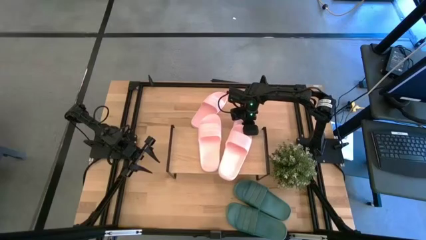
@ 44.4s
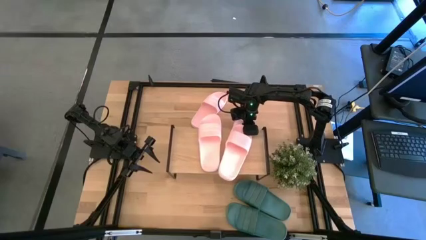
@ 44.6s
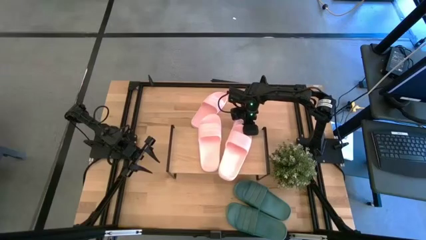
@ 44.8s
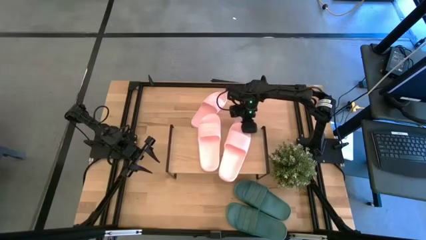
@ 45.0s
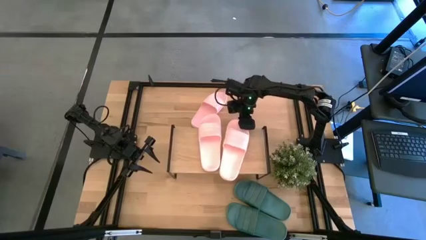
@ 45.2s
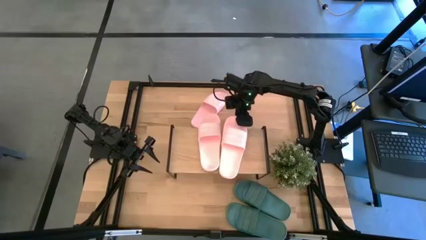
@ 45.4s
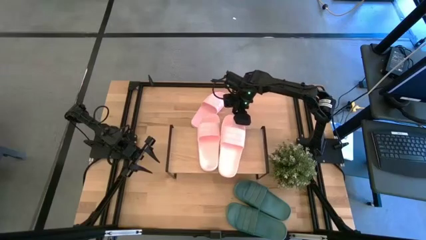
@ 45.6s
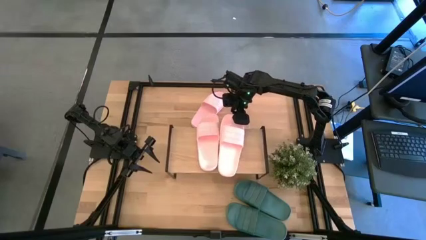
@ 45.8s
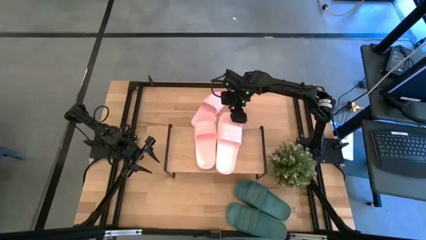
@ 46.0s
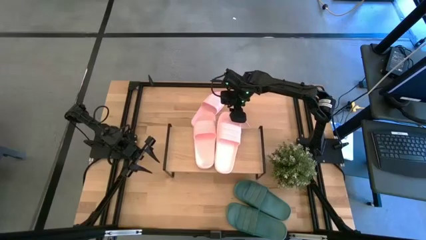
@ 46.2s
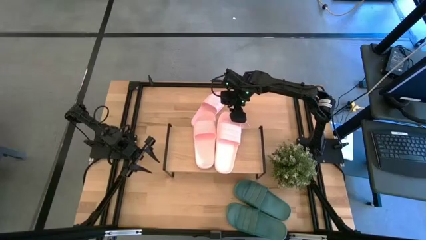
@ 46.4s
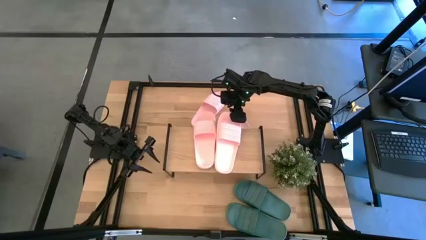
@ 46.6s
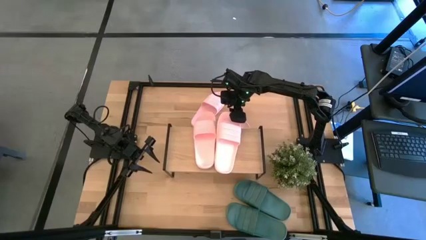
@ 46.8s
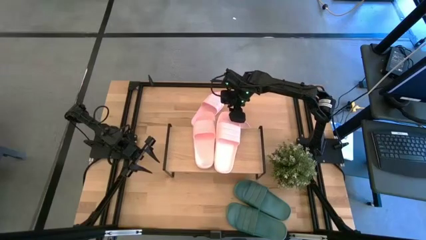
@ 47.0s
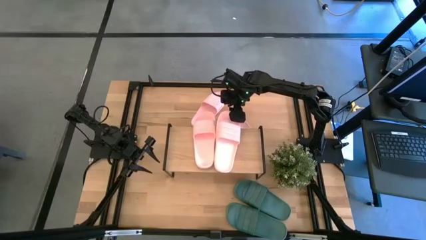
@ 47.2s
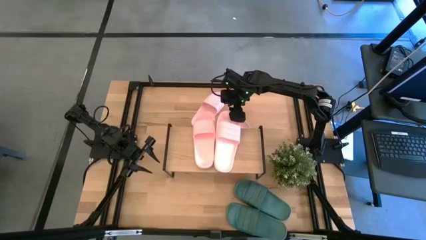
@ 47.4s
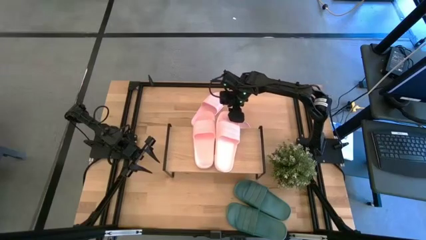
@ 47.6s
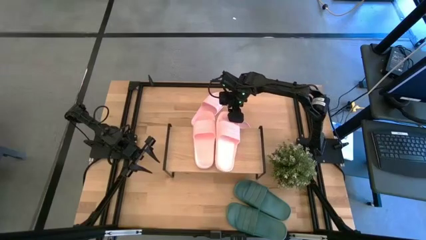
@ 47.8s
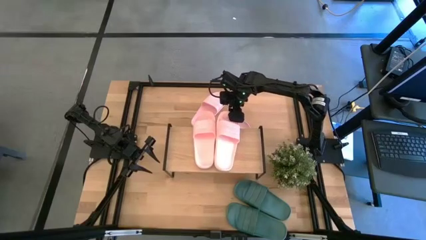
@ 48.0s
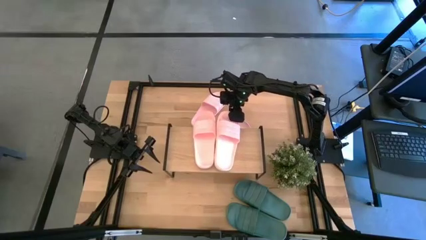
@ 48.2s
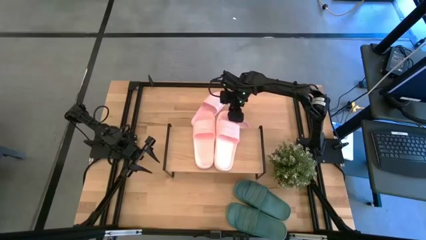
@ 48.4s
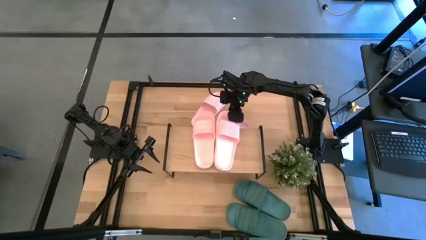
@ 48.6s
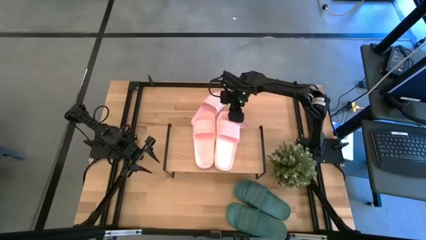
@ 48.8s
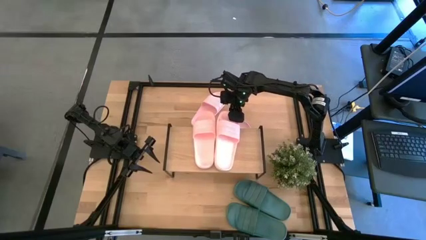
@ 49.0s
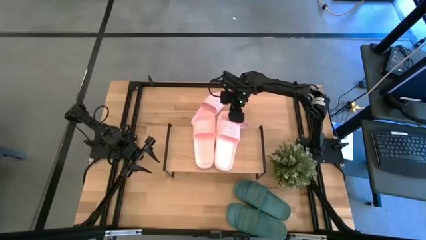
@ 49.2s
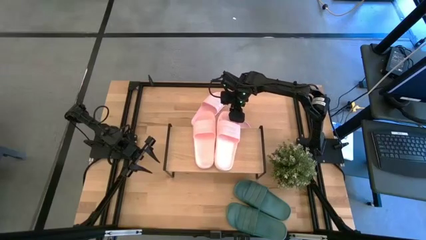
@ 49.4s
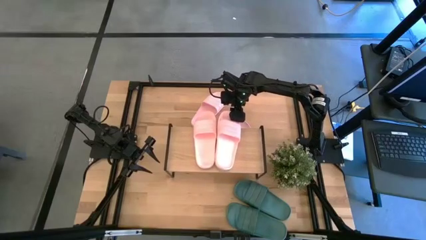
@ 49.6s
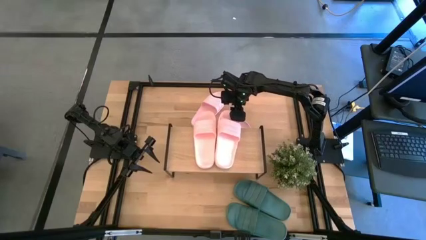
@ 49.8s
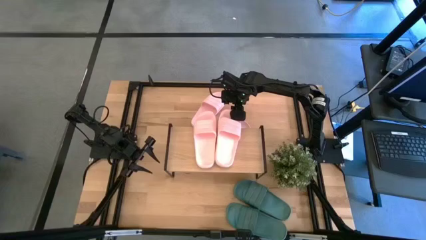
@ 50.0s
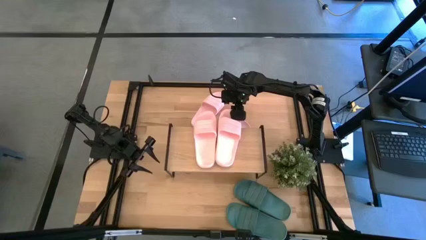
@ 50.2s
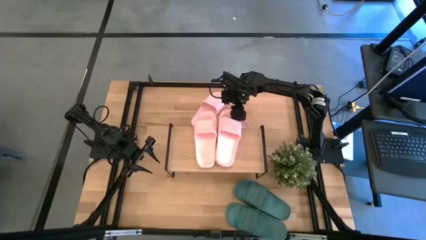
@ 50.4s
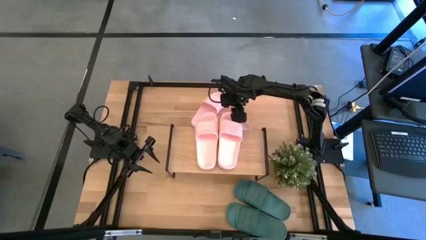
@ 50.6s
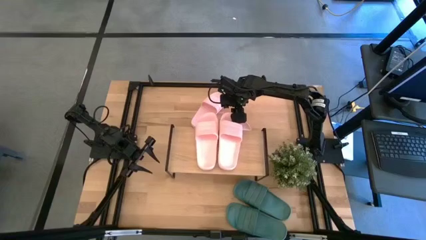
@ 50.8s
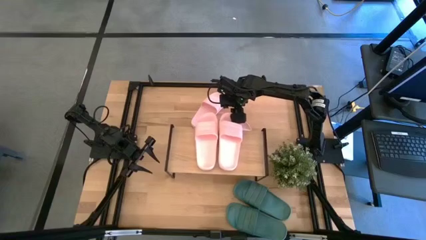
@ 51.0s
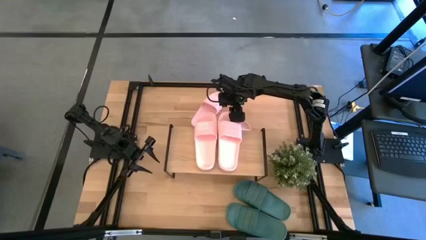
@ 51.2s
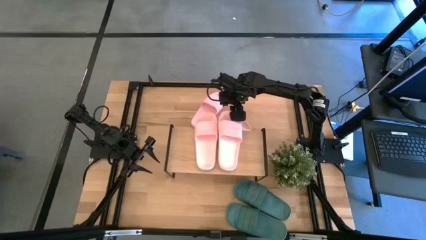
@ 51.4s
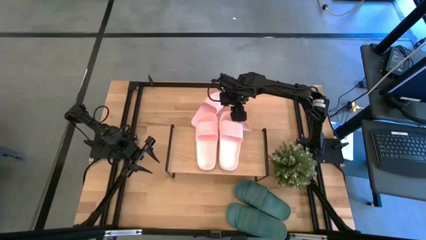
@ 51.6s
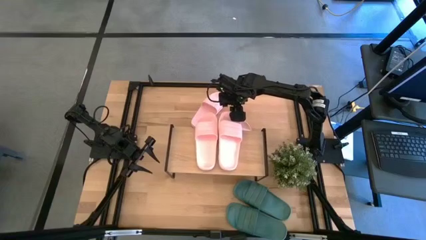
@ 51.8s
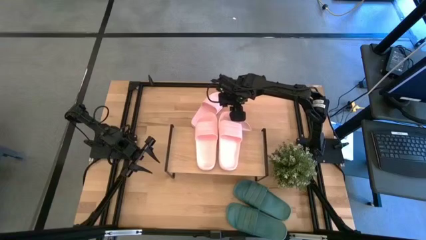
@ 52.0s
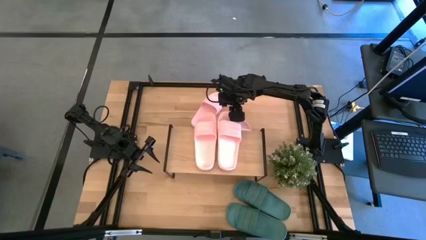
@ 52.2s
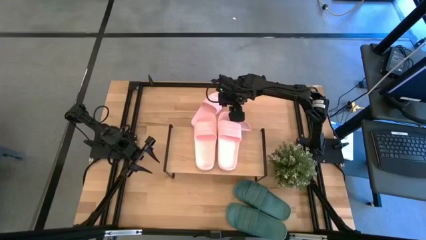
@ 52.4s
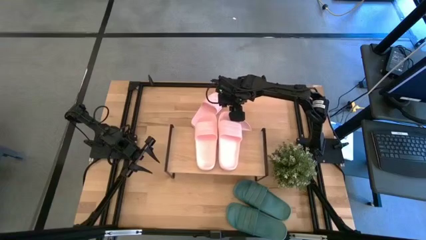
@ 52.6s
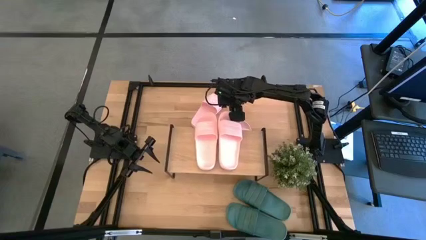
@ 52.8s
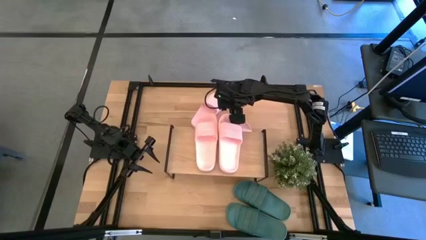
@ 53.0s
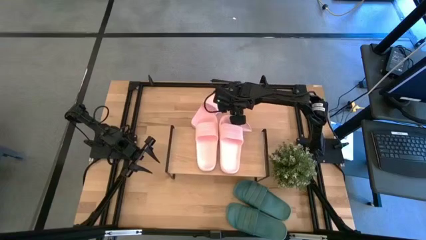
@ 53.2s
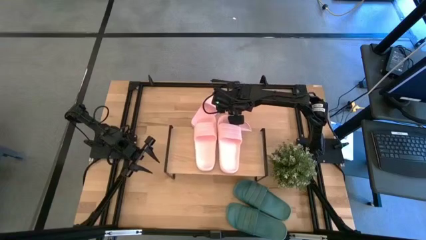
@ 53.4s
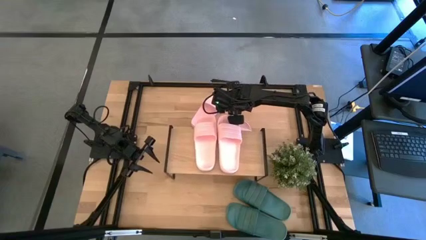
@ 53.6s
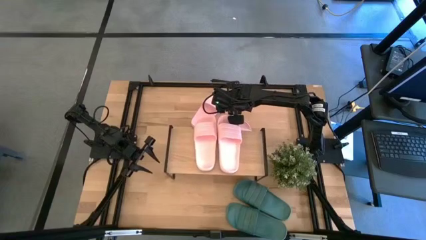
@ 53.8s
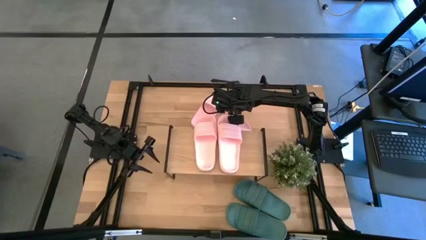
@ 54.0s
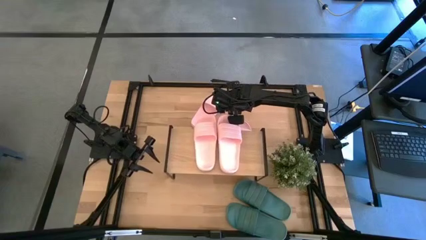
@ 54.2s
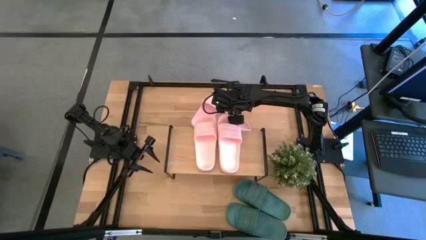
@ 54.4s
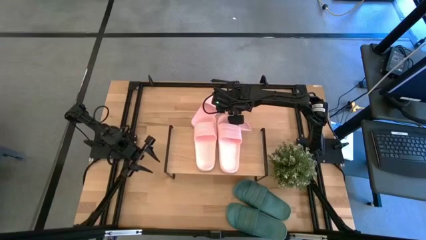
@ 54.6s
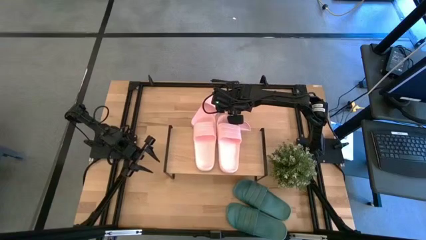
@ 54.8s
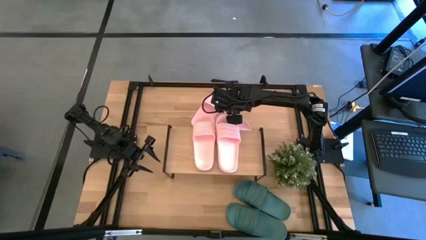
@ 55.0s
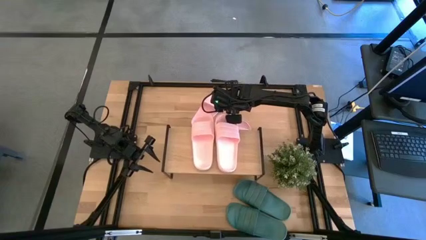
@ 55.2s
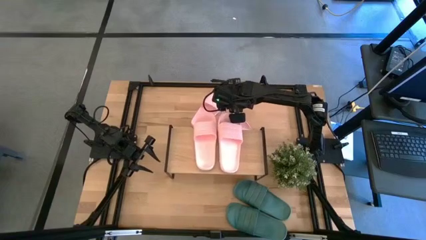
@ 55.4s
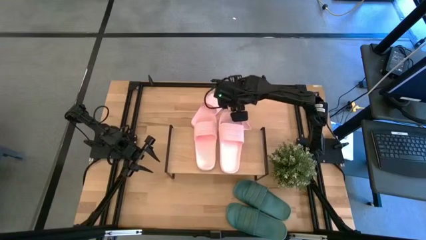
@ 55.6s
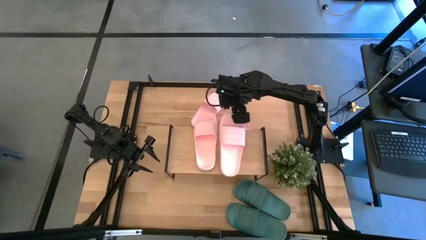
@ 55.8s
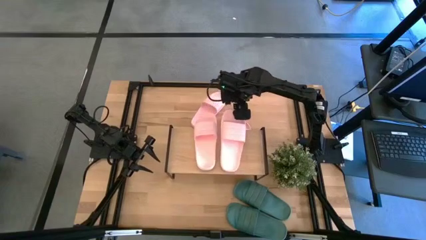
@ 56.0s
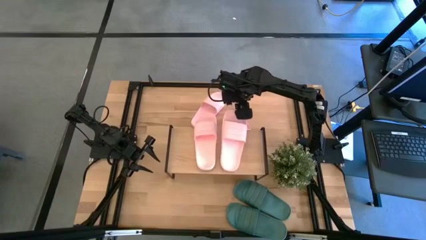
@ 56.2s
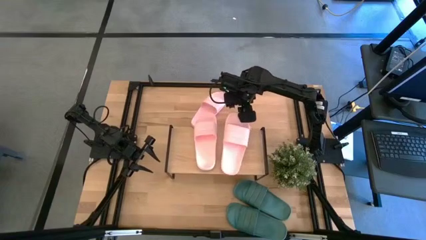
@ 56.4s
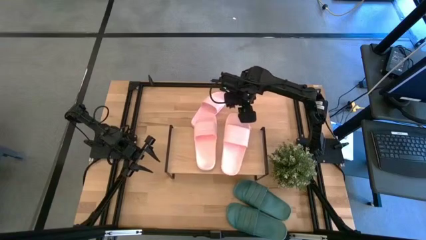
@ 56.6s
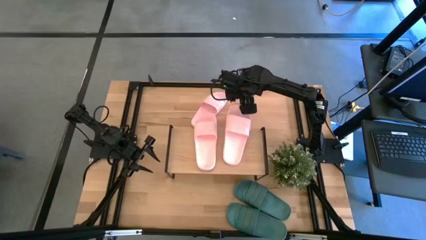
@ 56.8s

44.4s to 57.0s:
Task: Pick and place slides into the shelf
Adjust the pink slipper on the shelf

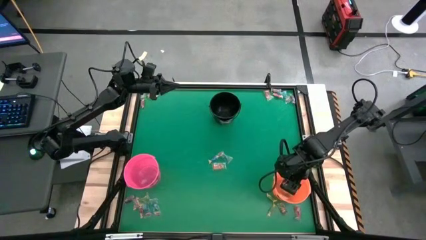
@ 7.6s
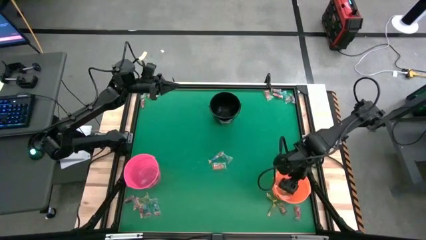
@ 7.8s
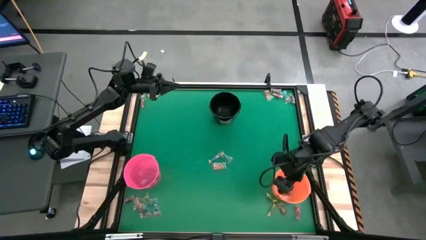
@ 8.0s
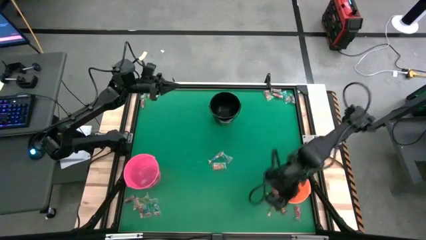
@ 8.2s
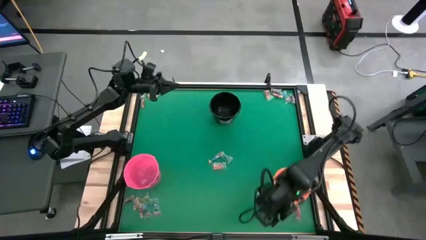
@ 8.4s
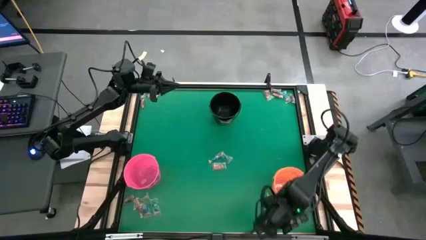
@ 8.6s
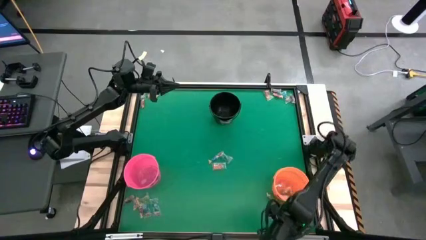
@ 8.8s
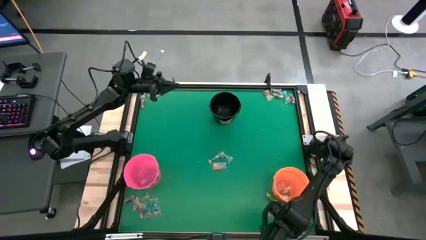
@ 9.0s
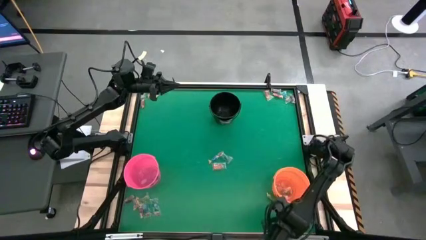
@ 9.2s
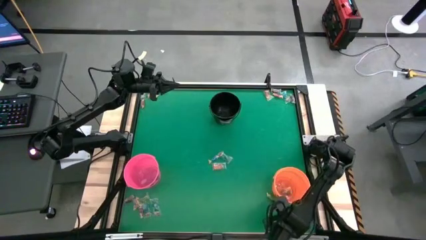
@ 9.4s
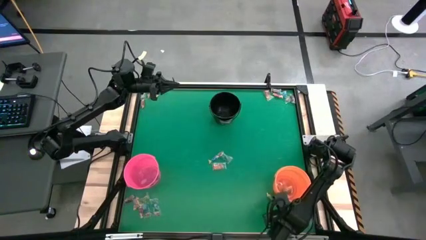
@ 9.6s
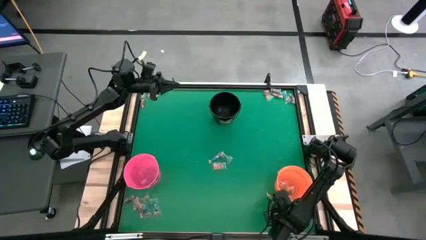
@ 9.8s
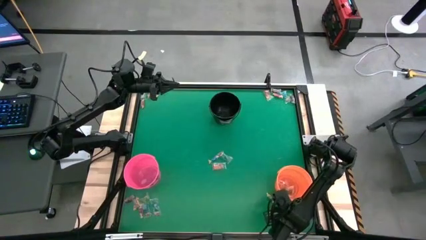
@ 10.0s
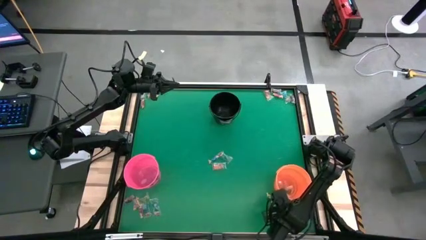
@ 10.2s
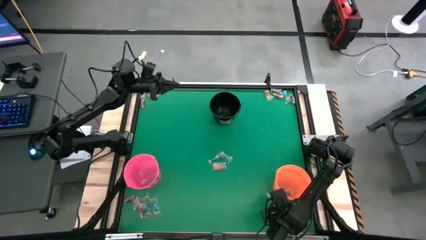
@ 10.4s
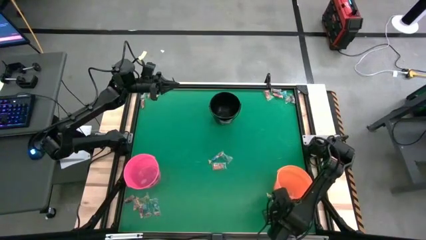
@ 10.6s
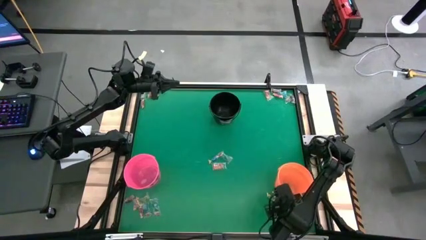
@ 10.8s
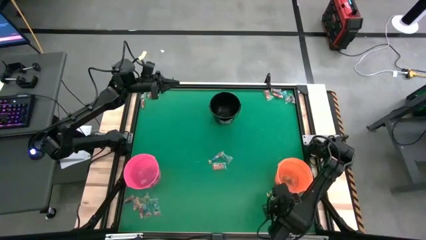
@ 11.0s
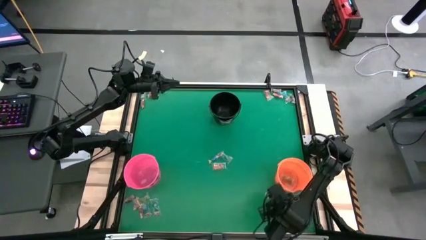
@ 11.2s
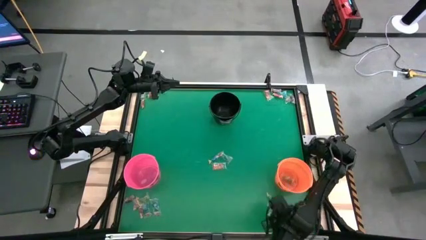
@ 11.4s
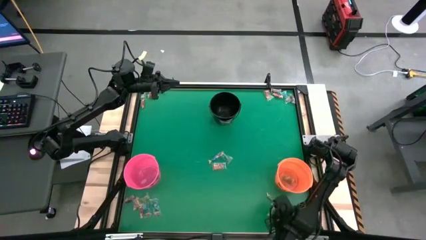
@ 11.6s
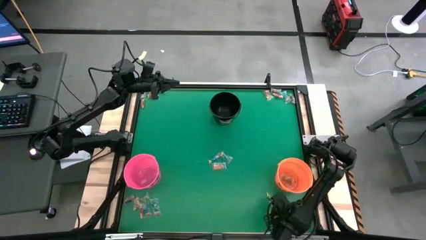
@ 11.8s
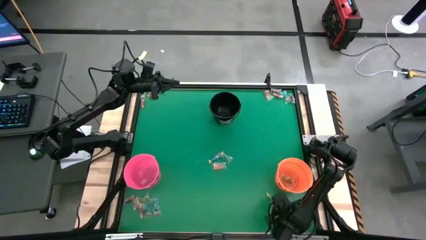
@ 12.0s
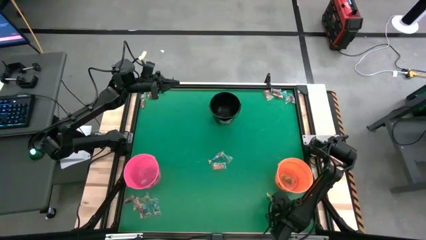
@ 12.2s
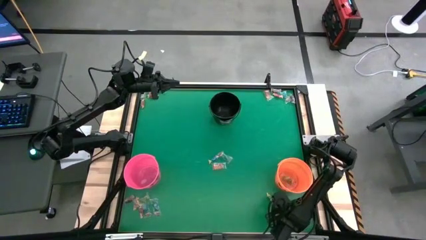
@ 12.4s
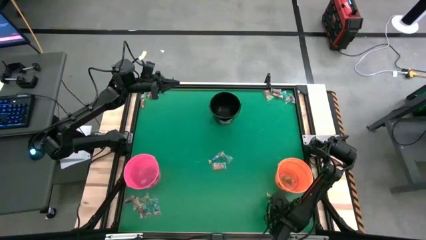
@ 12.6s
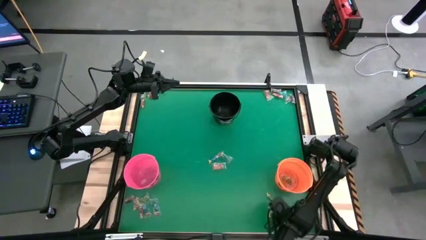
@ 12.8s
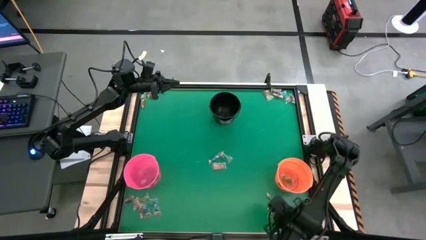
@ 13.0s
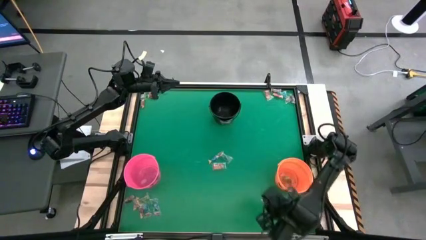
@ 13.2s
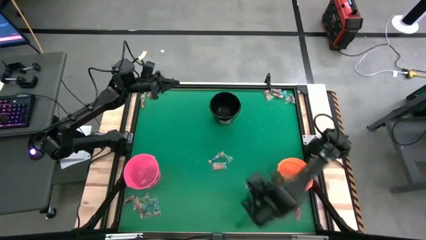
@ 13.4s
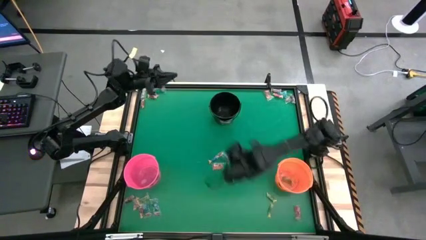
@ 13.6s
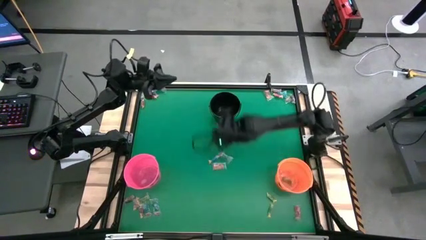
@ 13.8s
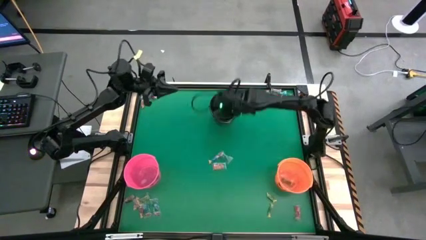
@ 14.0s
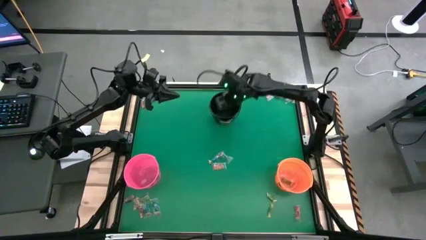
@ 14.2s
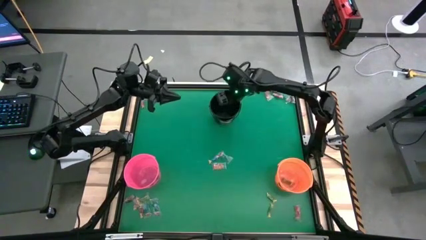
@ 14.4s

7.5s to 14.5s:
Task: Sort candy by brand, put in halloween buckets
Put the transparent candy into the black bucket
